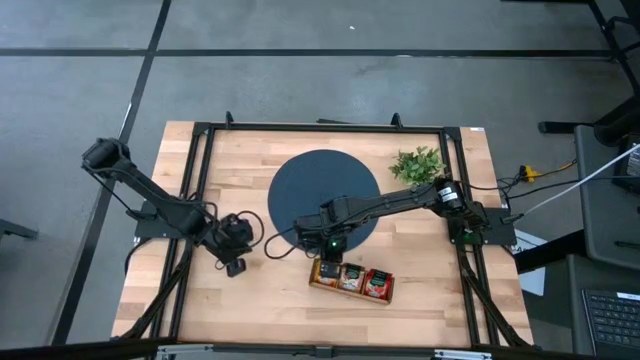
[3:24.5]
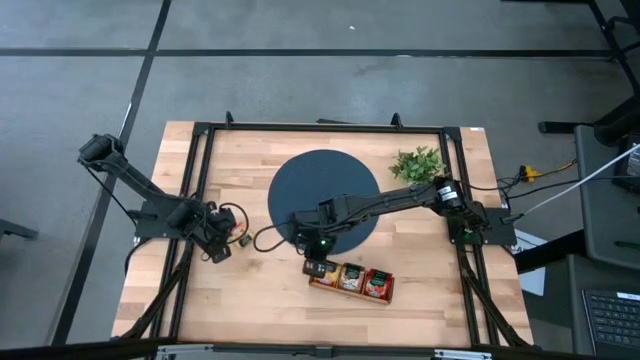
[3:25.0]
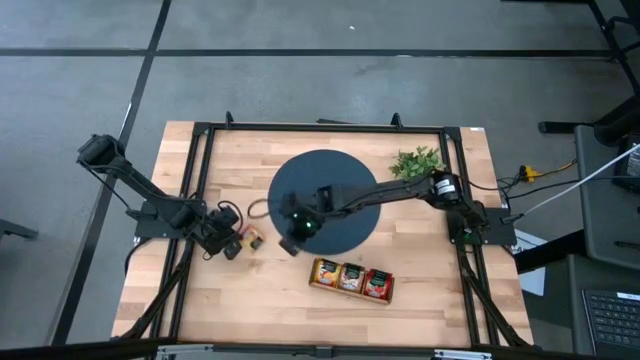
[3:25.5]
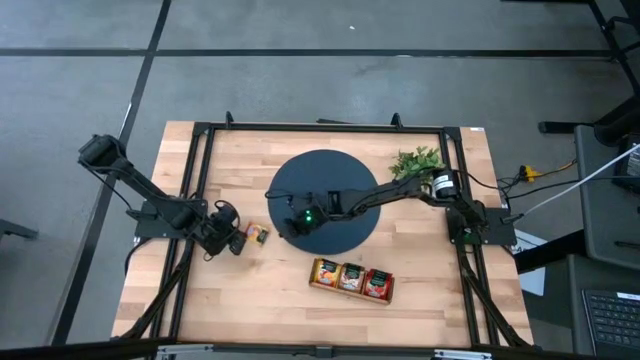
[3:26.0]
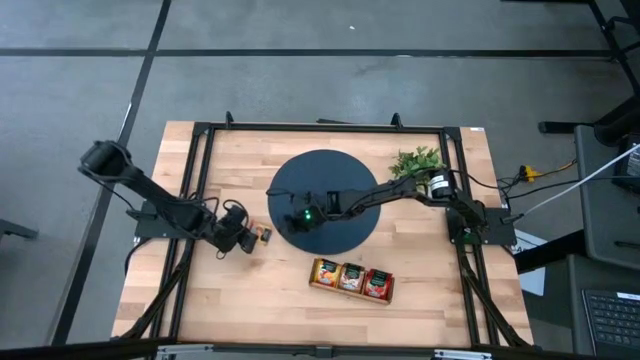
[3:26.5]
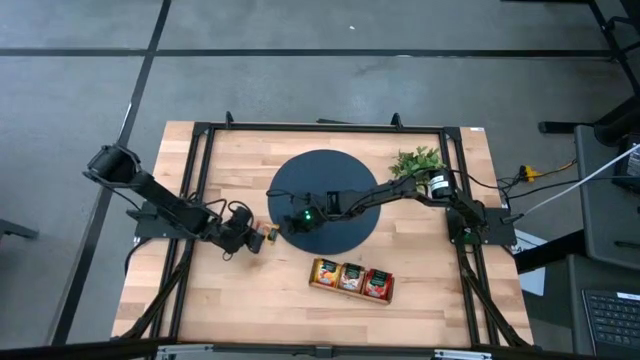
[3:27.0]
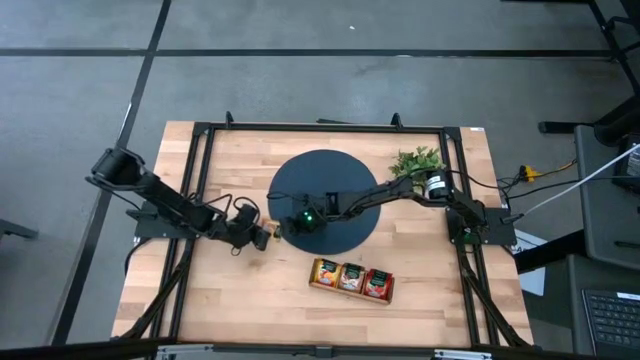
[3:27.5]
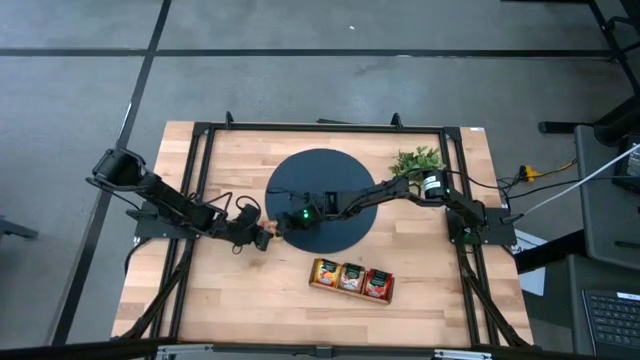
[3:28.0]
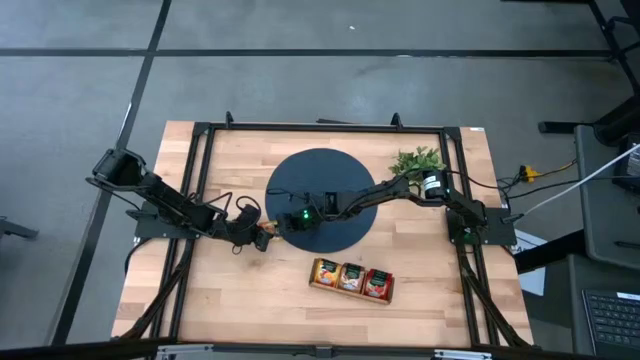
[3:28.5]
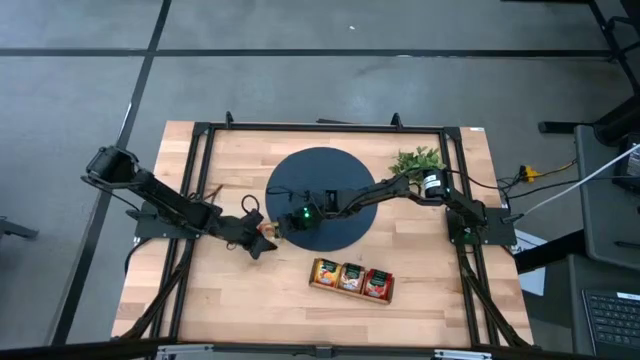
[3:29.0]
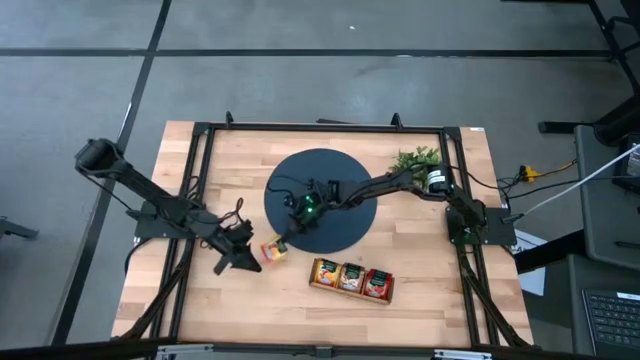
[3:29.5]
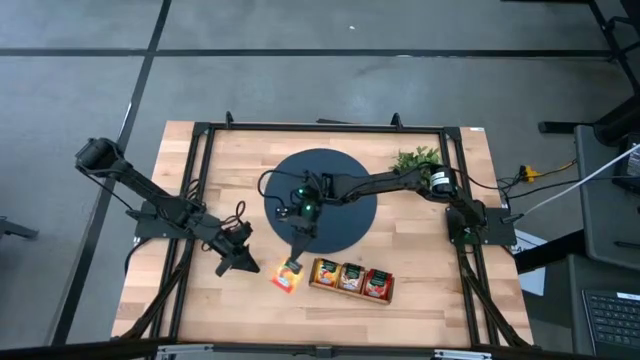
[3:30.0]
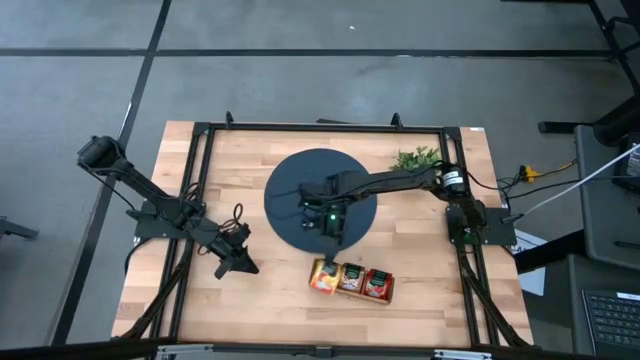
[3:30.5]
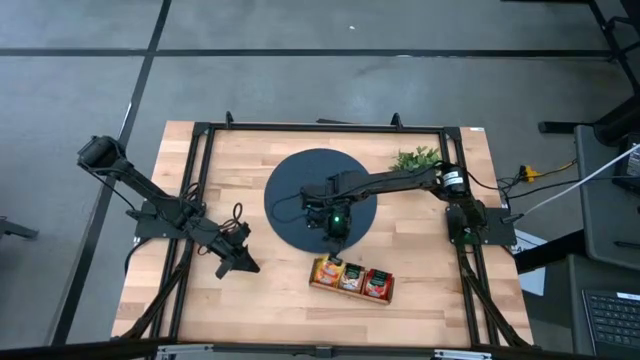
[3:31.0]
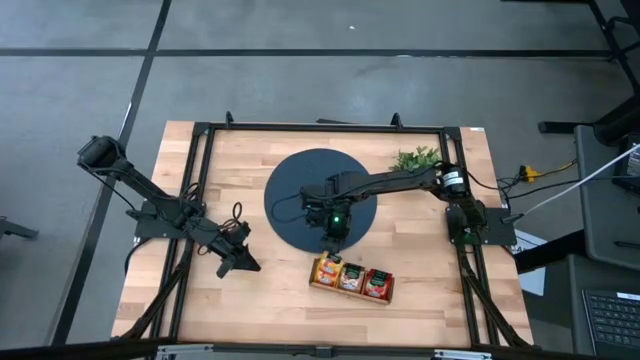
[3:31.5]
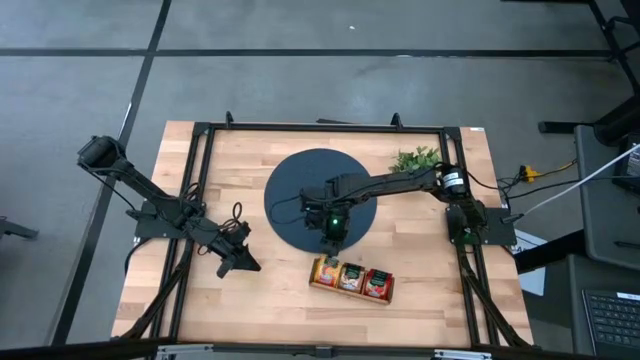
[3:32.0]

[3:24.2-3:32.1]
Task: Pick & Place Tea
Put the yellow tea bag into the left section of the wooden organizer

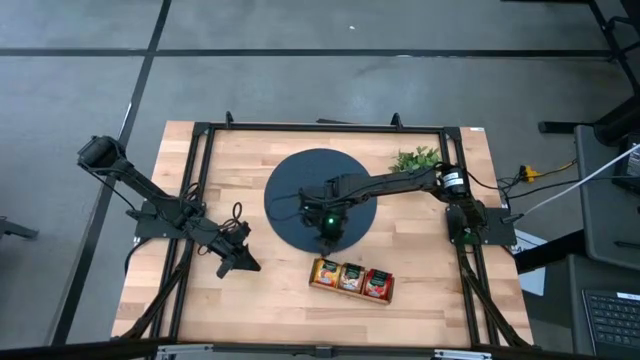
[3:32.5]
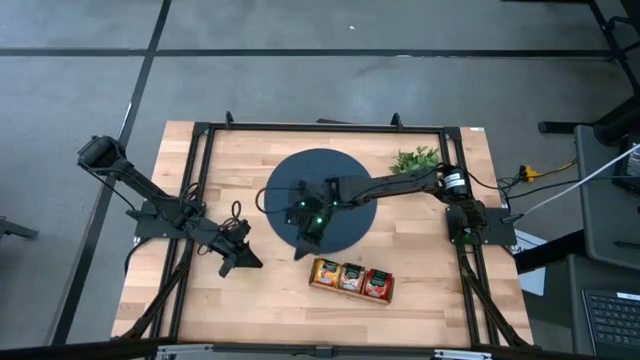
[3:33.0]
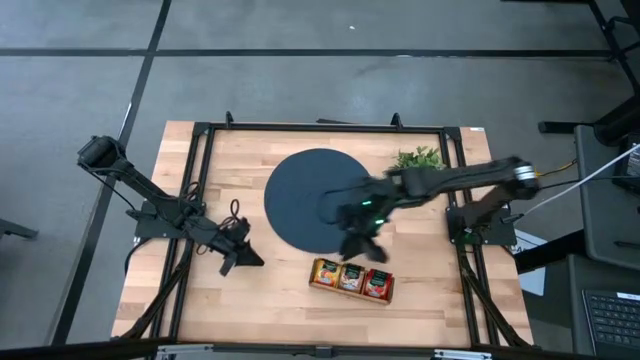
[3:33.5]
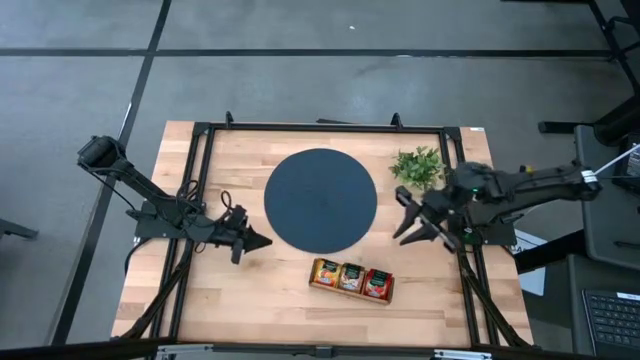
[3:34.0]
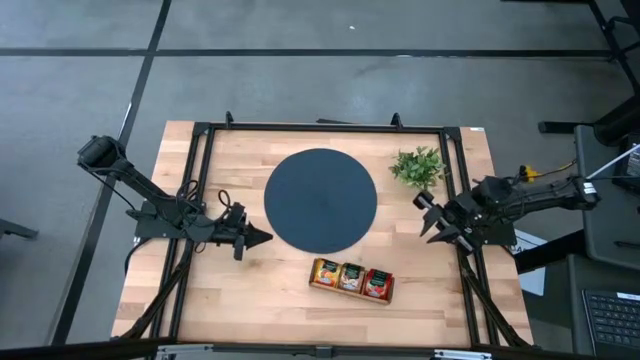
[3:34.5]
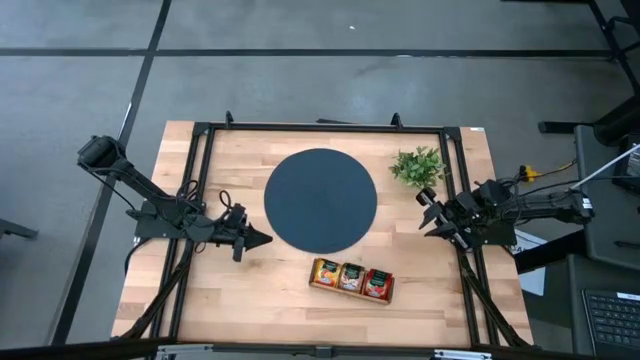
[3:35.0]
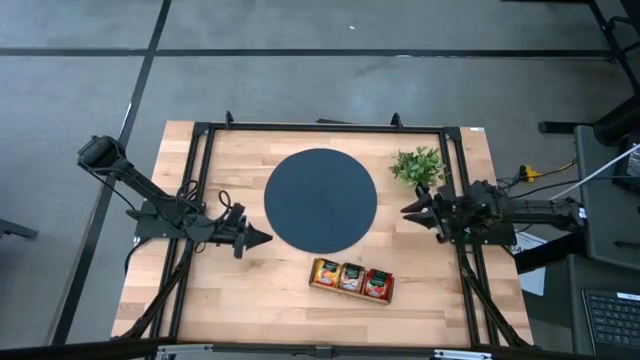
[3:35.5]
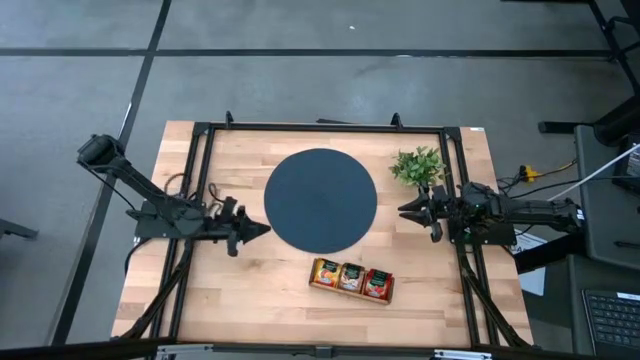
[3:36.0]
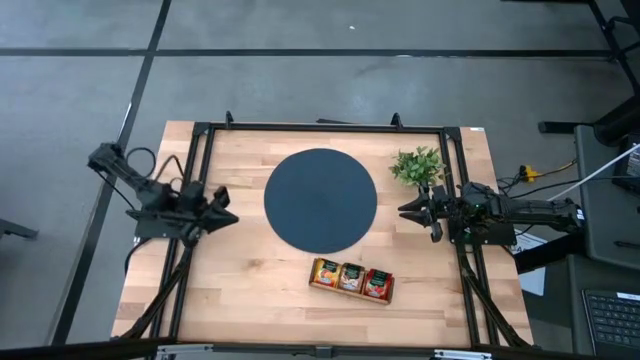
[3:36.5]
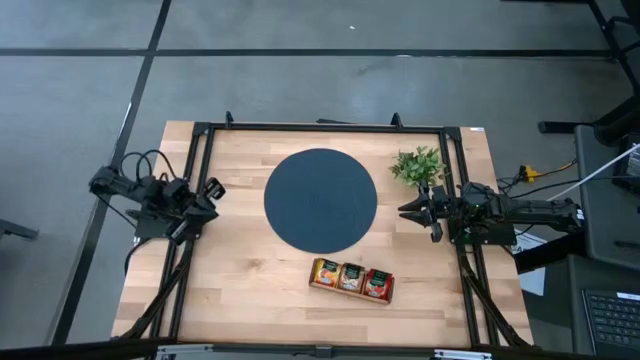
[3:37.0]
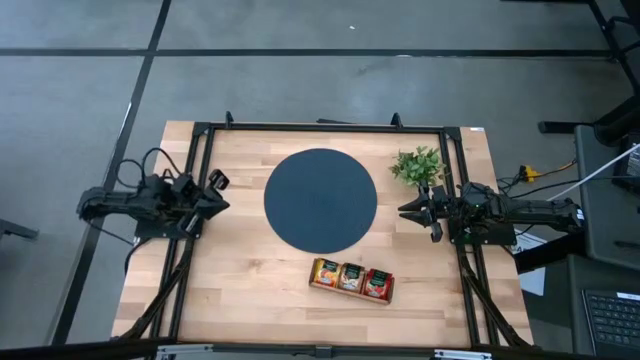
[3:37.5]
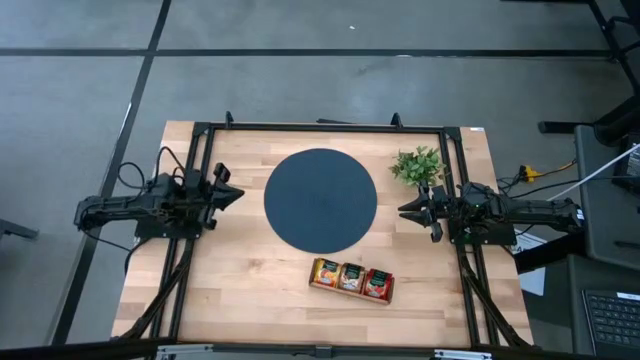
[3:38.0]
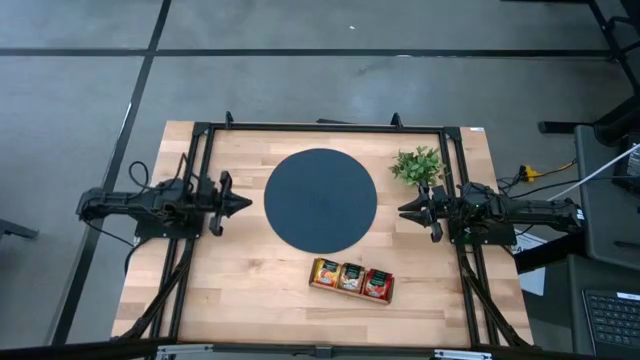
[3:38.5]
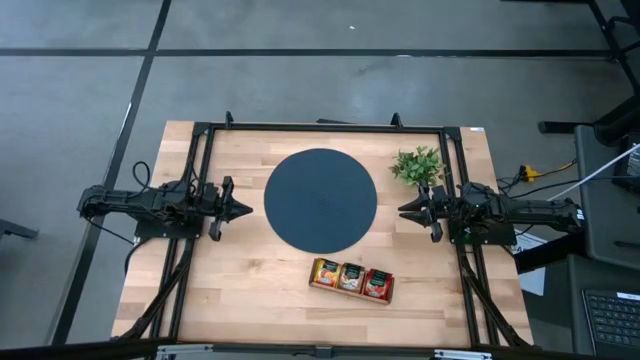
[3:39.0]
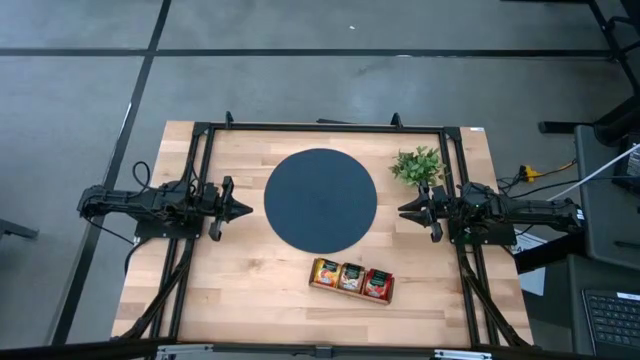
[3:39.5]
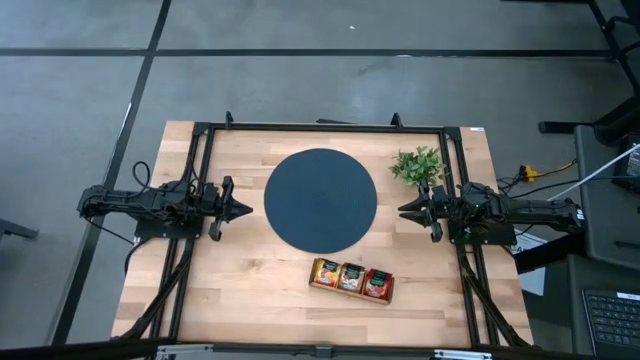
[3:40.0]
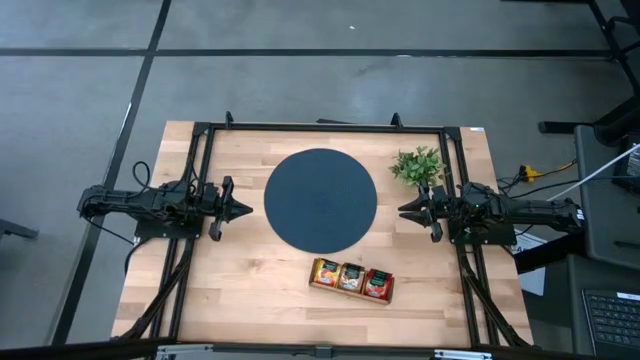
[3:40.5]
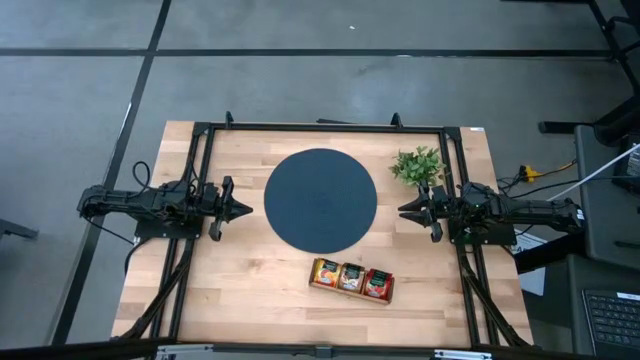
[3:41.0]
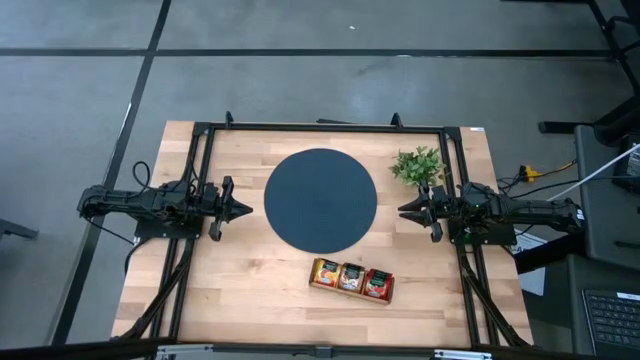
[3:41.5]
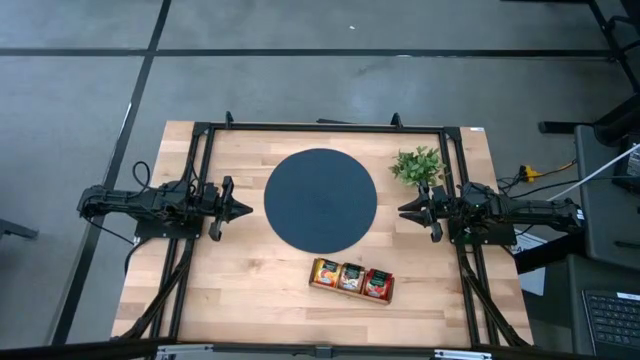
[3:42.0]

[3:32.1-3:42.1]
Return to Home Position
